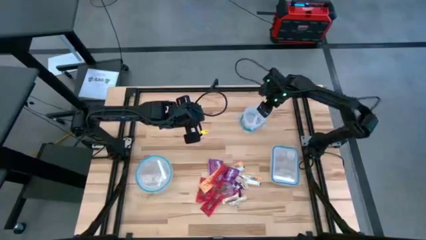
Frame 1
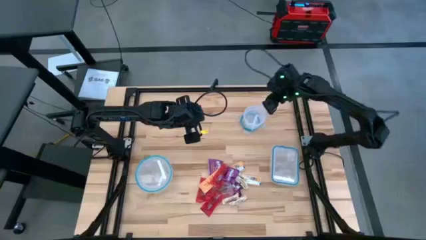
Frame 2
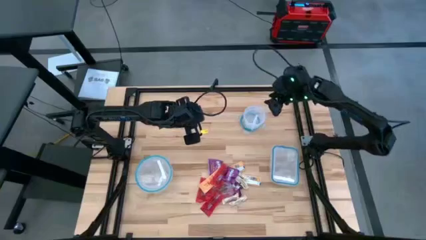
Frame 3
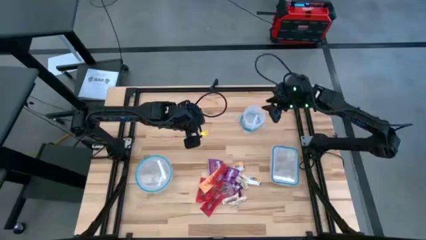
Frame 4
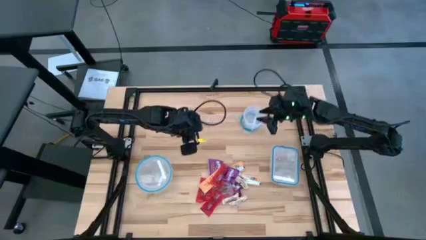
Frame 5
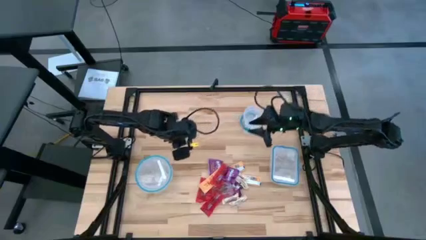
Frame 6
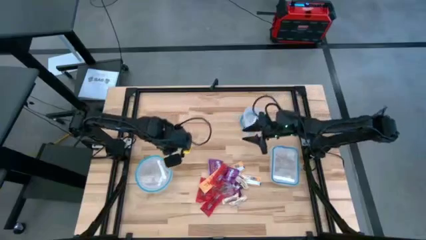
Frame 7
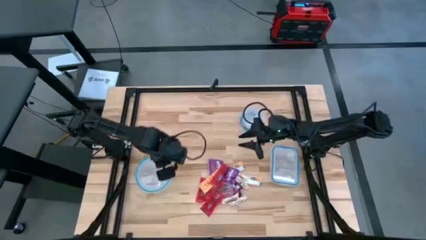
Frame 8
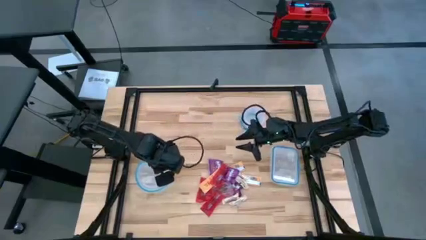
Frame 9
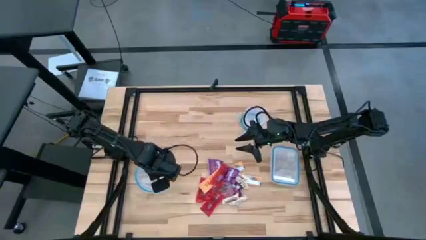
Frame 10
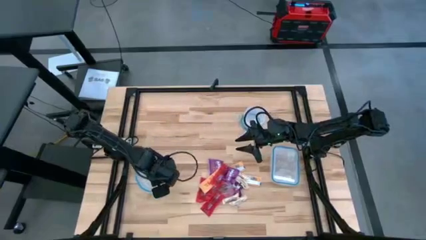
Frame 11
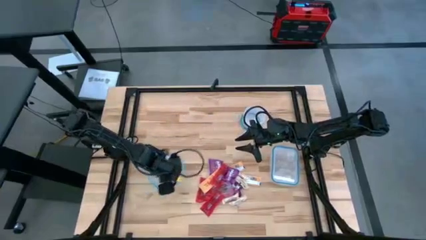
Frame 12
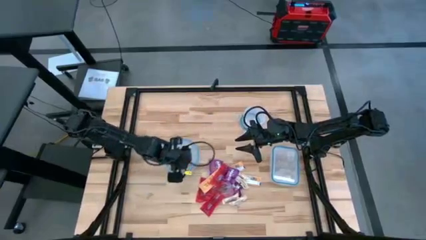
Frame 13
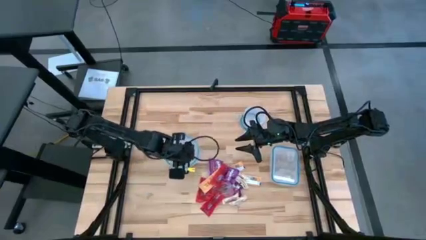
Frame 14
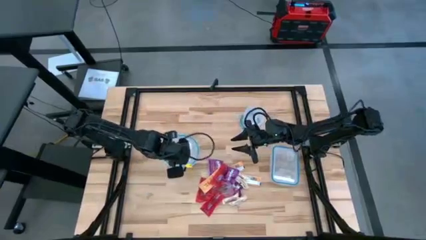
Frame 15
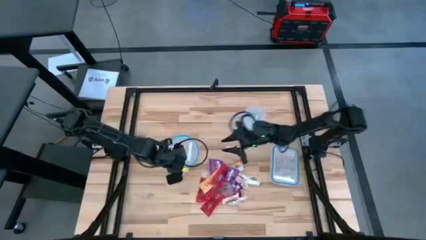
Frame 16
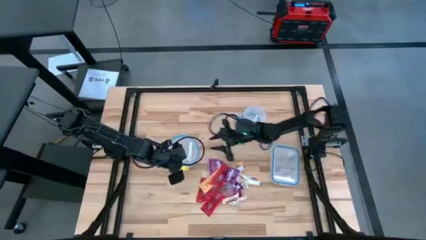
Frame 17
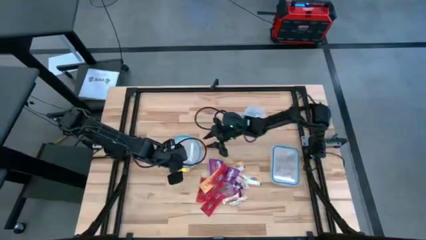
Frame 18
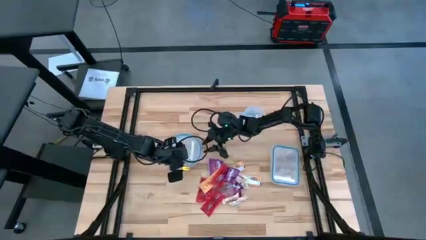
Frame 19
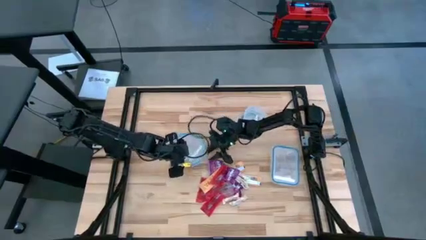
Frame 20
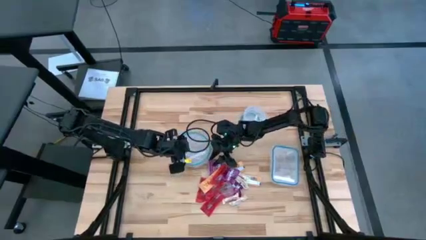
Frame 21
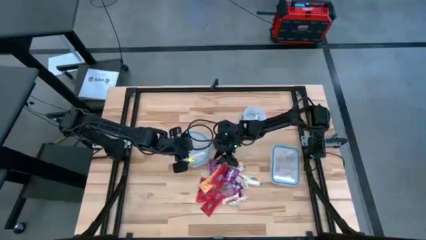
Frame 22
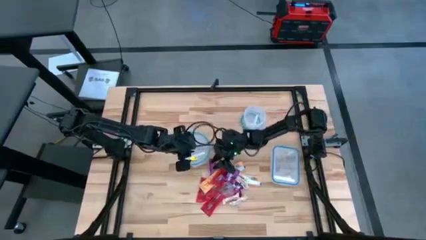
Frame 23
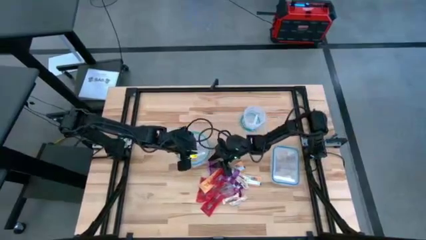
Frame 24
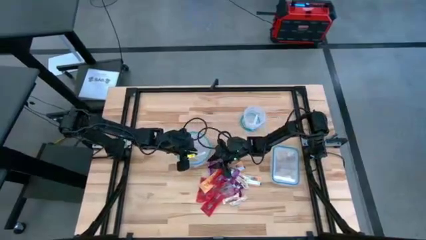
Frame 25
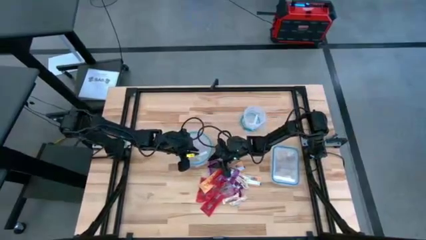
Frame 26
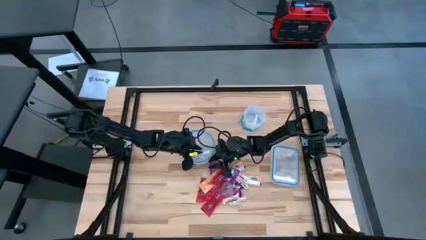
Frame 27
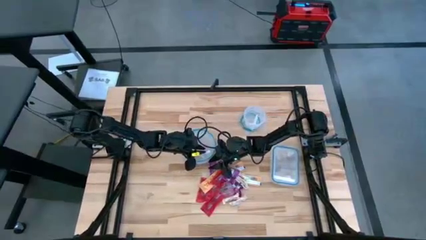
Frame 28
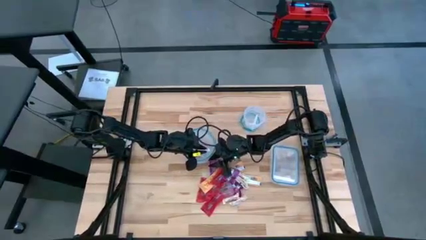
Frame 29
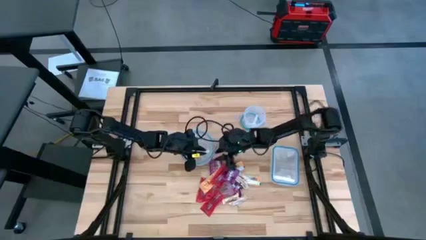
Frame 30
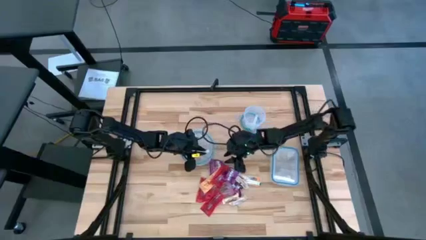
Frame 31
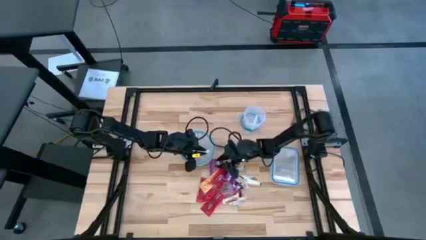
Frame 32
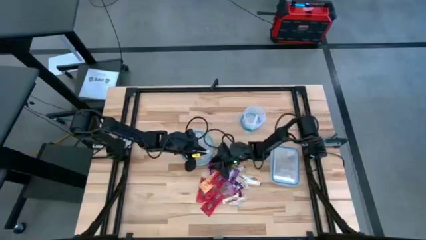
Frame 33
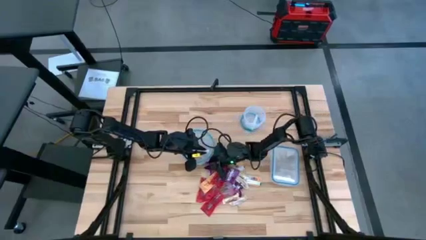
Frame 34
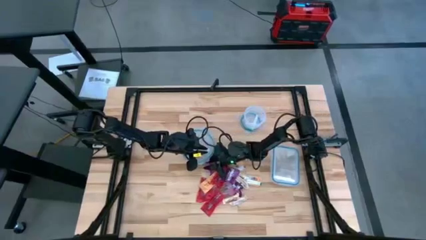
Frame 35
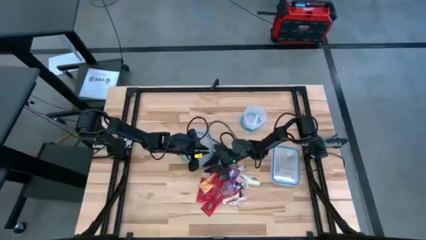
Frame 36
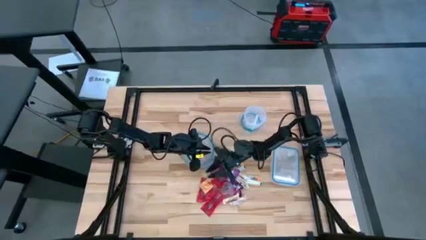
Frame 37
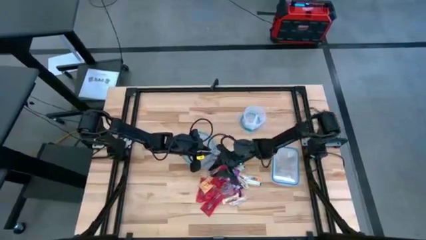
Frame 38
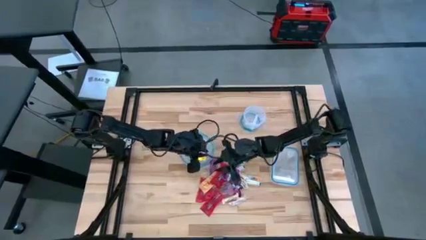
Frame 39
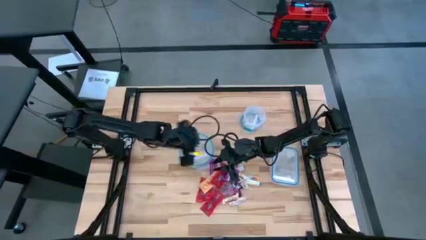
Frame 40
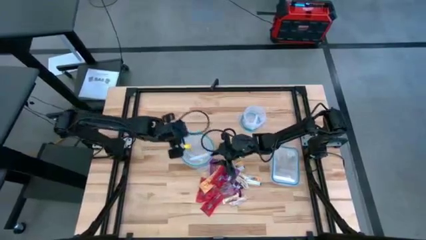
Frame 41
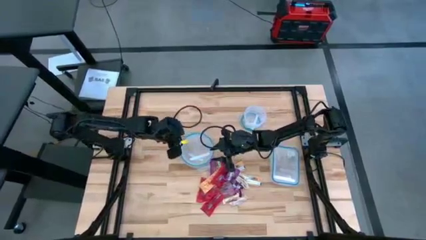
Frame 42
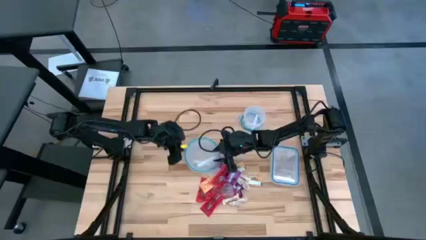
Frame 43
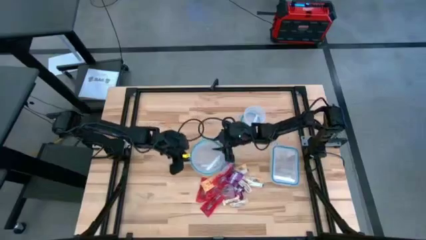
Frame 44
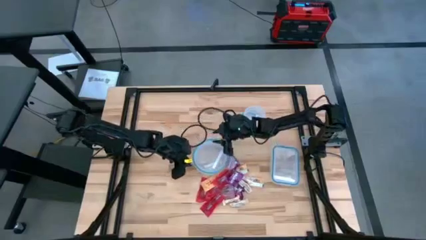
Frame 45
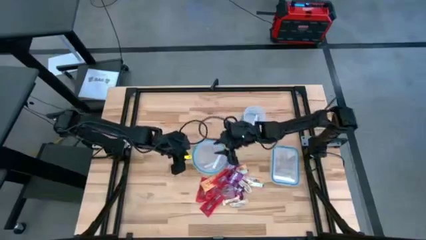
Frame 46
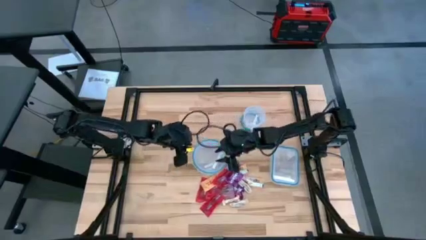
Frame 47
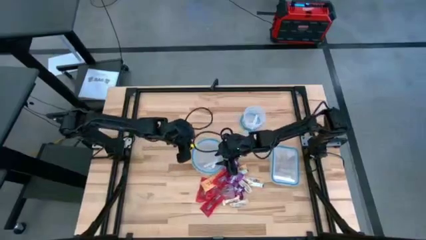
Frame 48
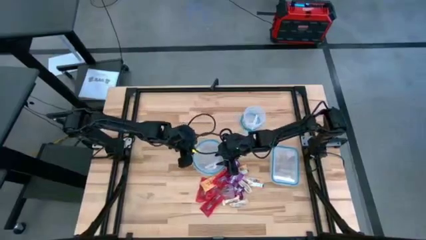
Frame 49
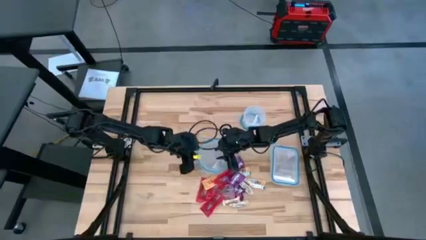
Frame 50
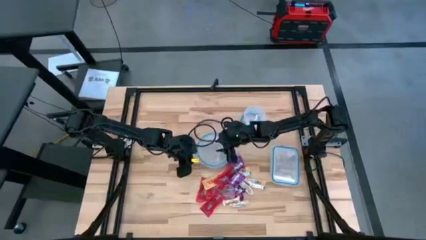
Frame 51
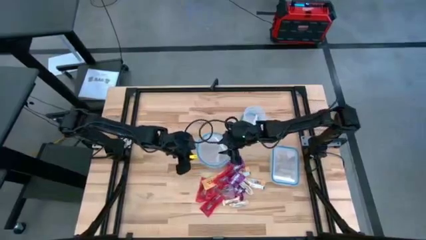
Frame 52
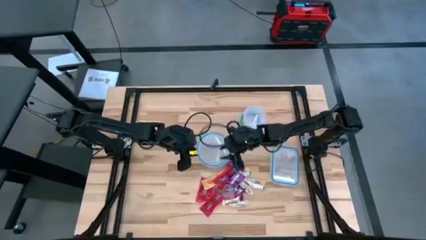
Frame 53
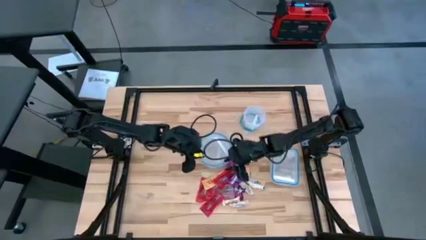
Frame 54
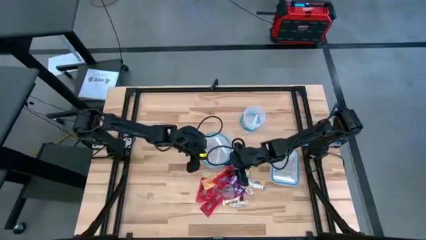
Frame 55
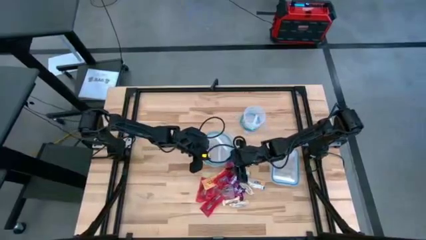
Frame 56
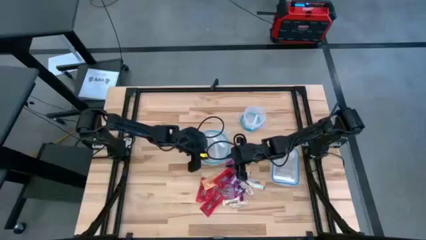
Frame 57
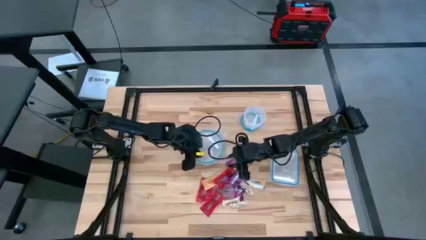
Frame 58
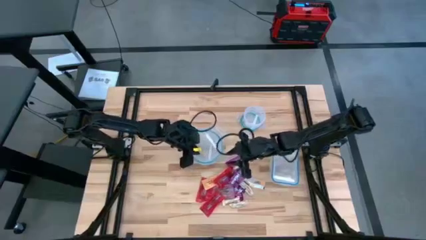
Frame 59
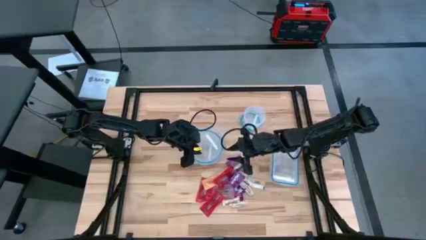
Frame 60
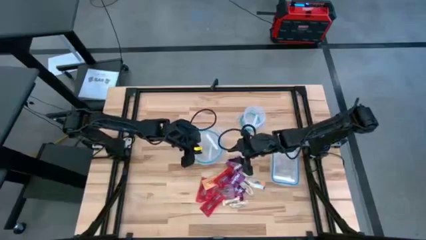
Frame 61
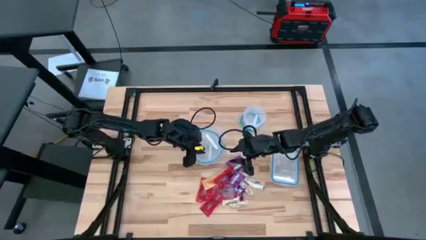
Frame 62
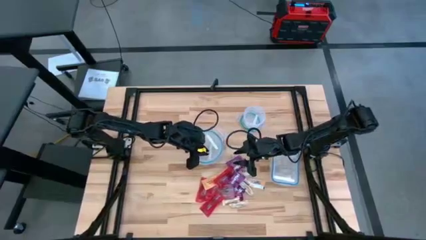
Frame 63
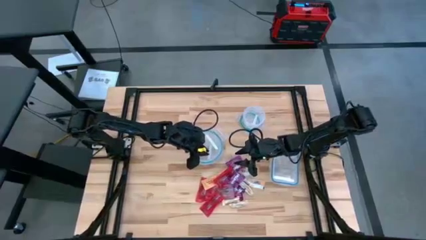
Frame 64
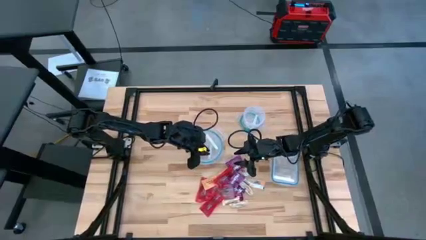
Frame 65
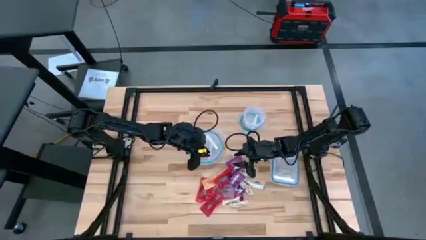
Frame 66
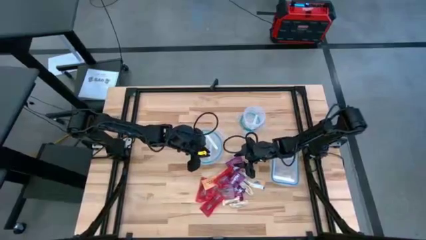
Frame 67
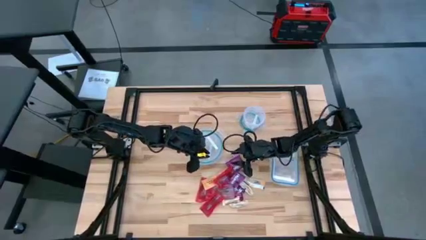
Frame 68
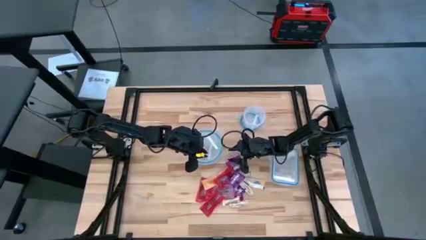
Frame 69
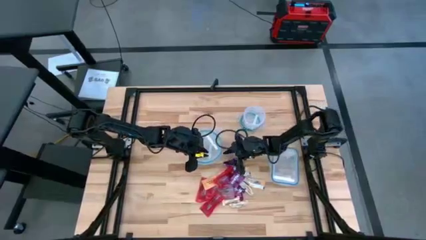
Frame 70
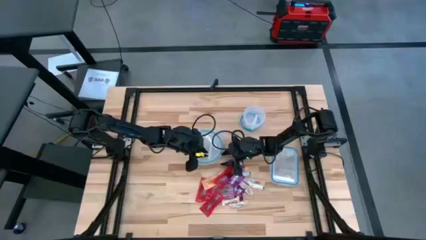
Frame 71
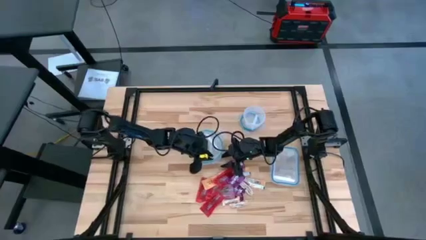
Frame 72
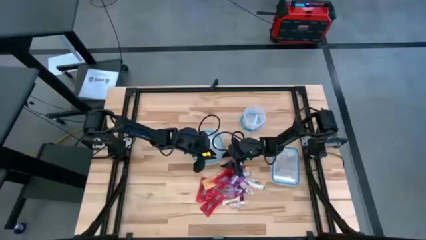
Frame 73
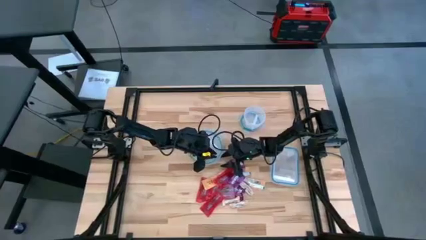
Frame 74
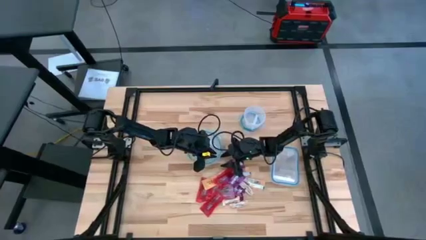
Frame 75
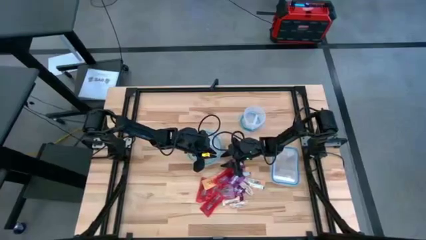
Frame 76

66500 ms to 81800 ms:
Task: Sort candy
Open the big circular transparent bin
